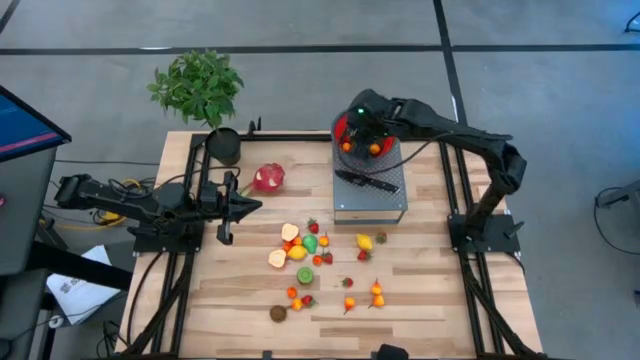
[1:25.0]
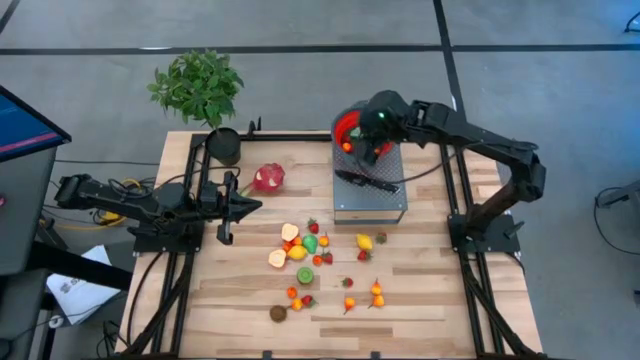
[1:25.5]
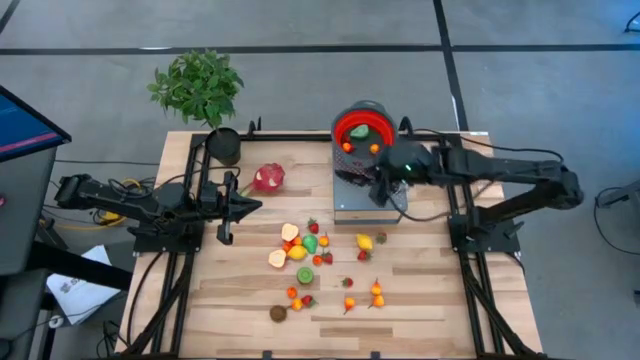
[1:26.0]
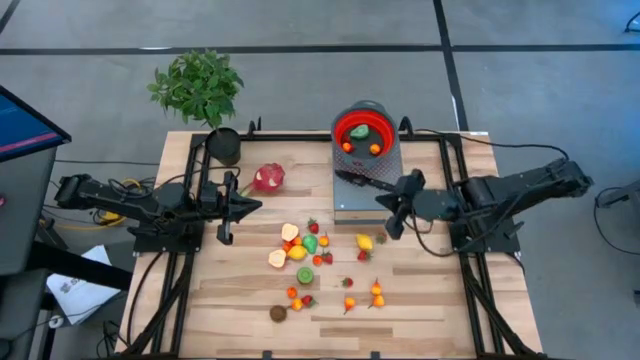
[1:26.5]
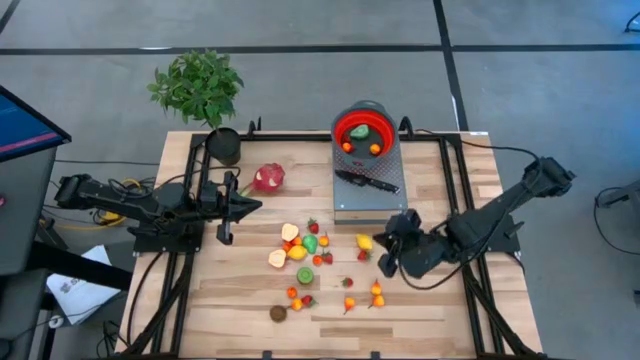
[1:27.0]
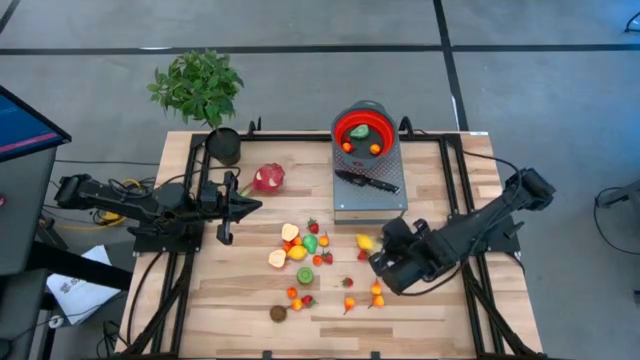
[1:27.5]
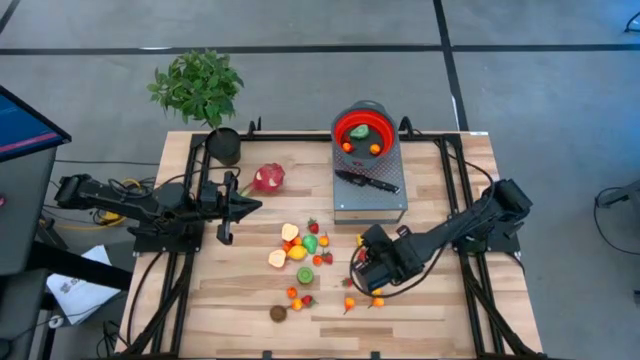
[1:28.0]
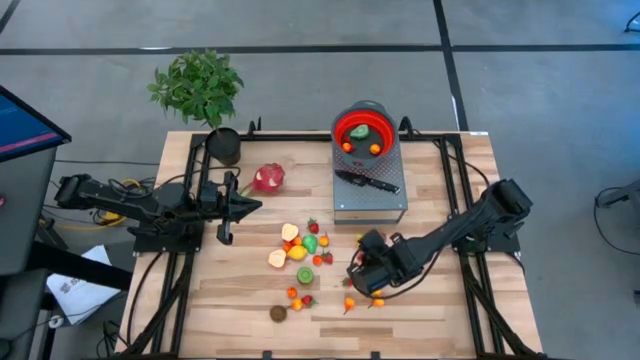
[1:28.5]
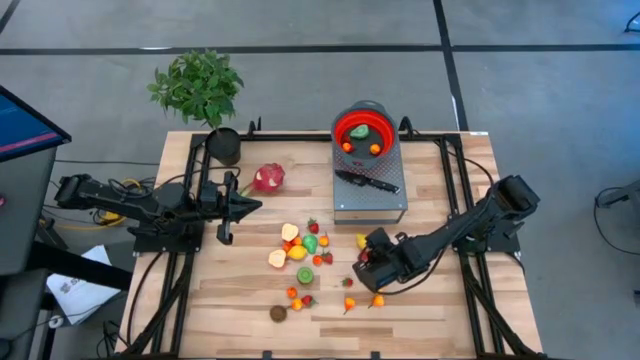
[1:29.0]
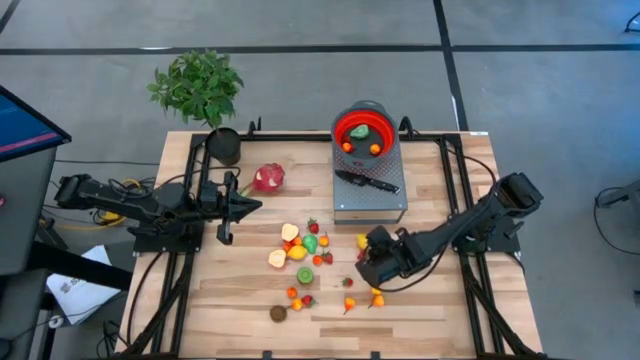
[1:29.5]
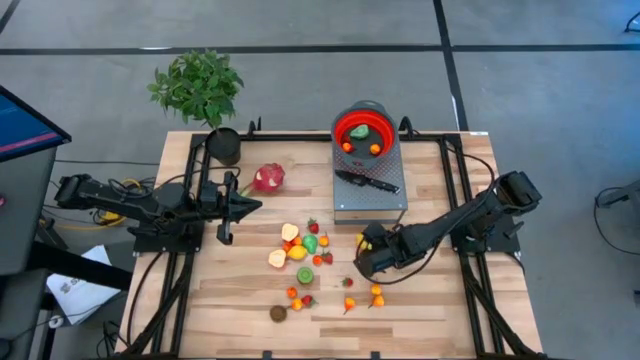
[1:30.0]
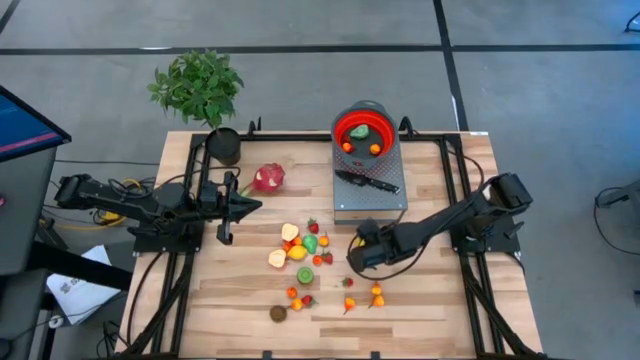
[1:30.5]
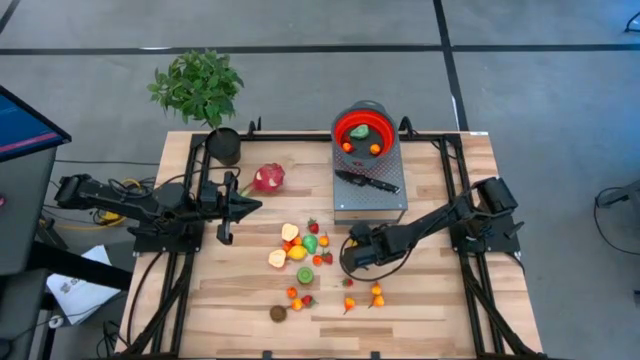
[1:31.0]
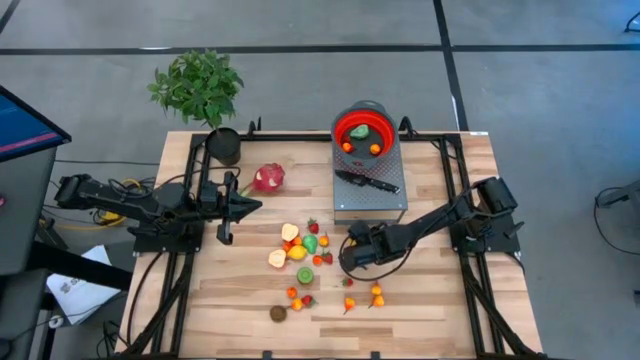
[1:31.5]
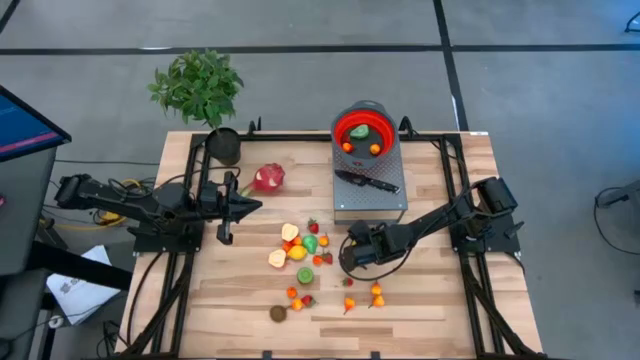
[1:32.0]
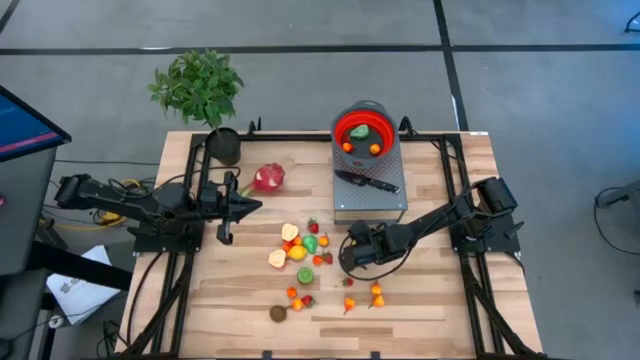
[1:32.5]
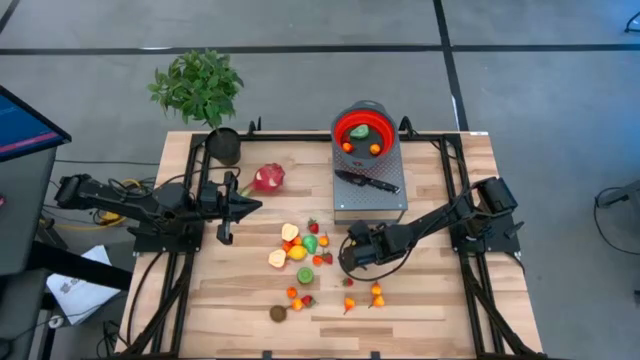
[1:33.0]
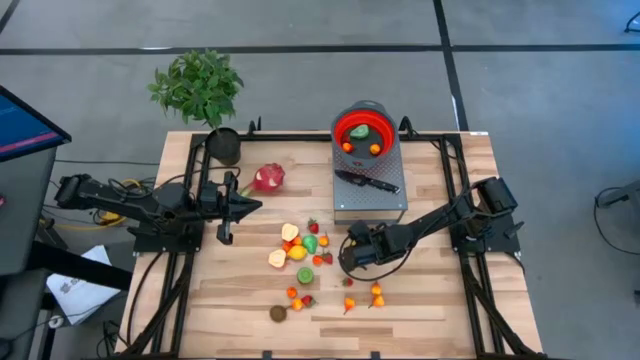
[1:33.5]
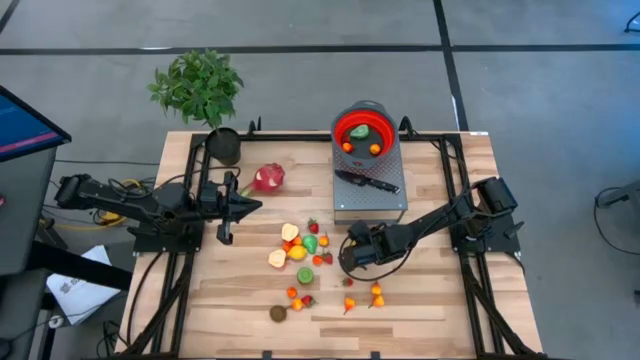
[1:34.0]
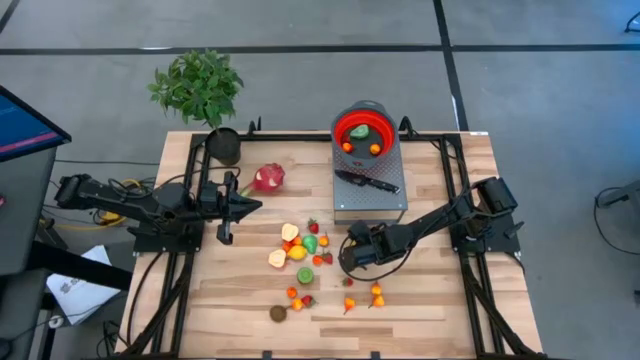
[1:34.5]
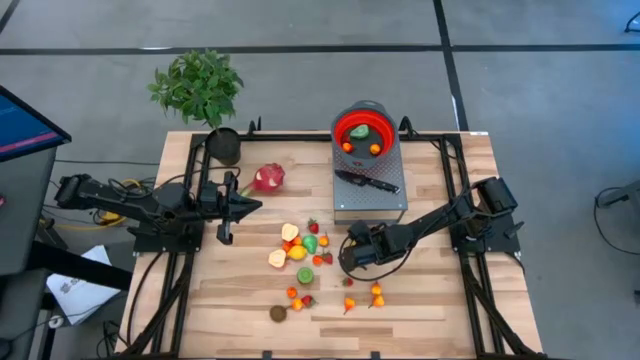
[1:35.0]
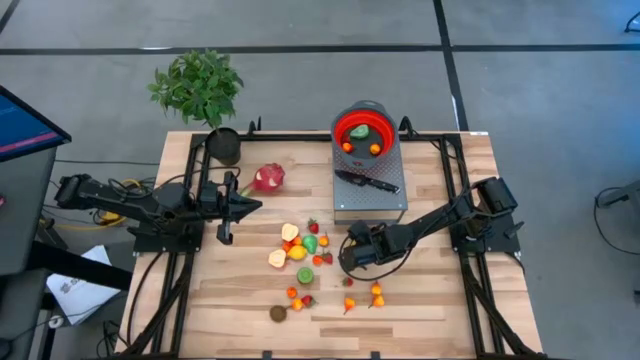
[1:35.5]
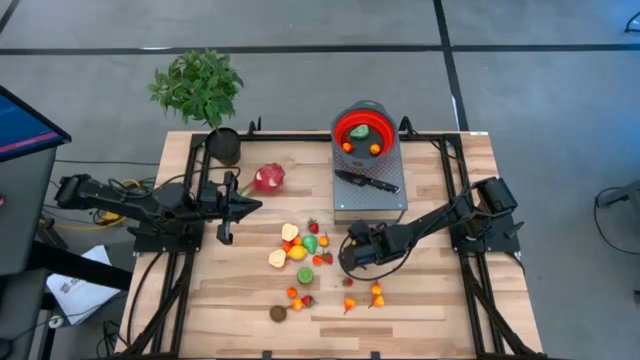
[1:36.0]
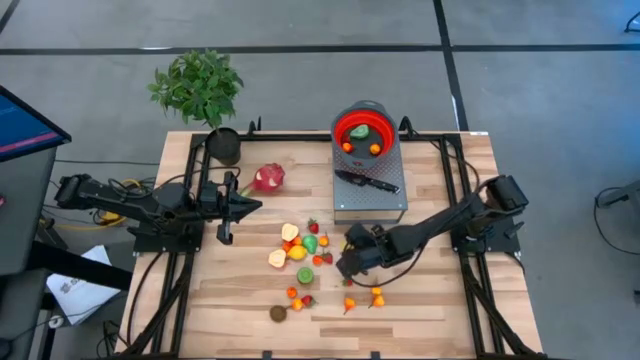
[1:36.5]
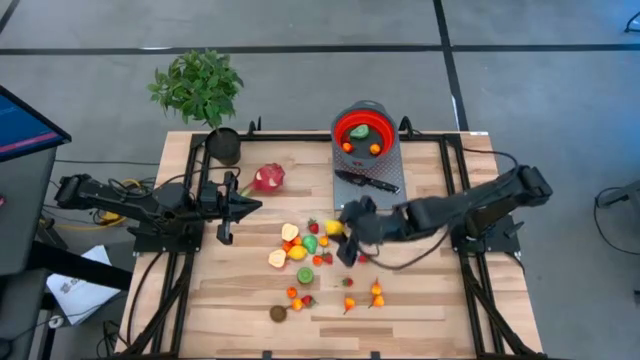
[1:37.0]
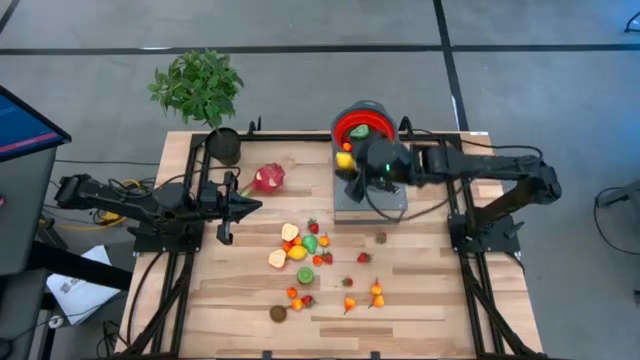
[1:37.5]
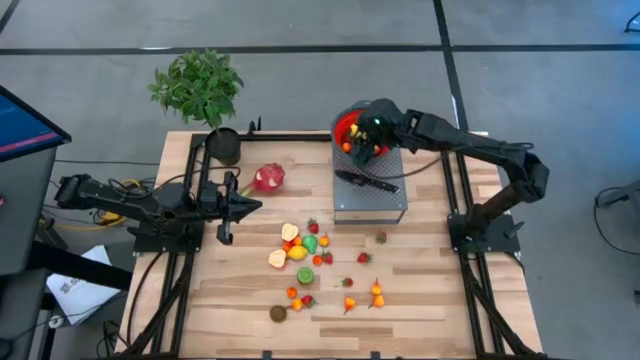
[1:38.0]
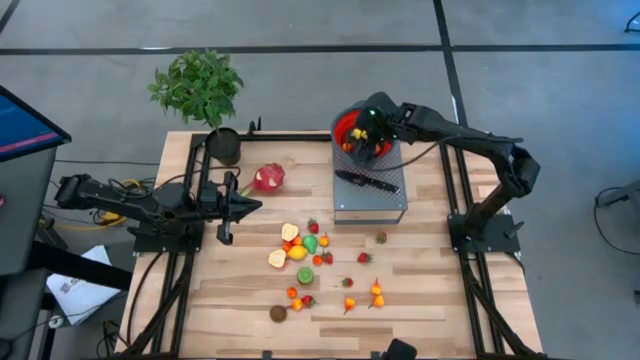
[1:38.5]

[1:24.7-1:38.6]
Task: Pick & Place Fruit
Put the lemon into the red colander on the shelf

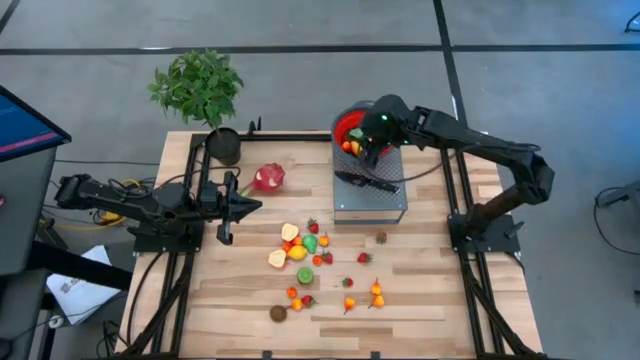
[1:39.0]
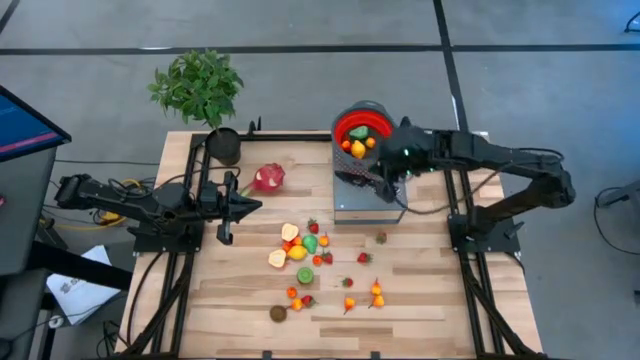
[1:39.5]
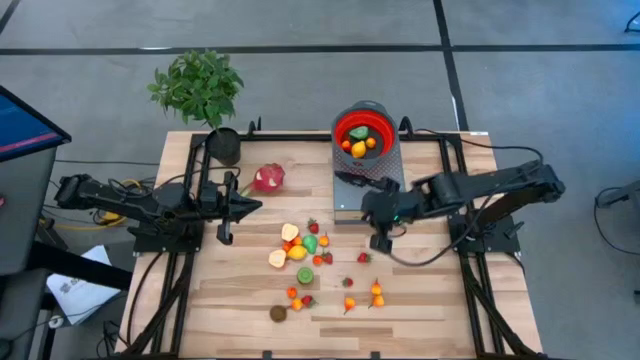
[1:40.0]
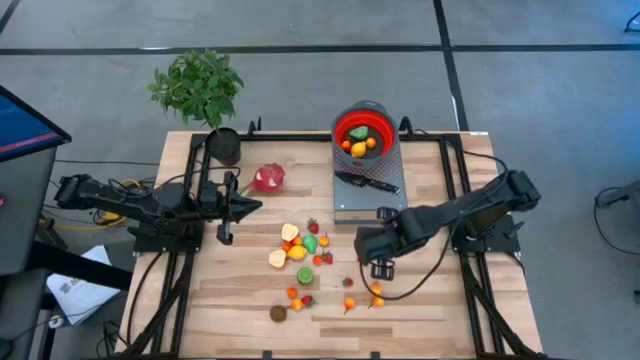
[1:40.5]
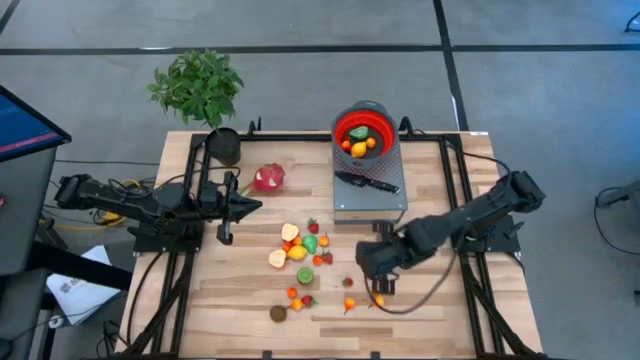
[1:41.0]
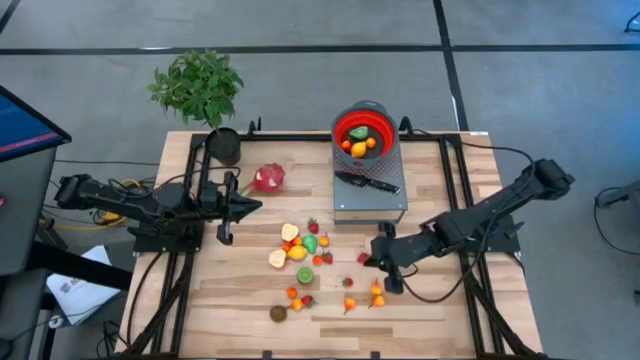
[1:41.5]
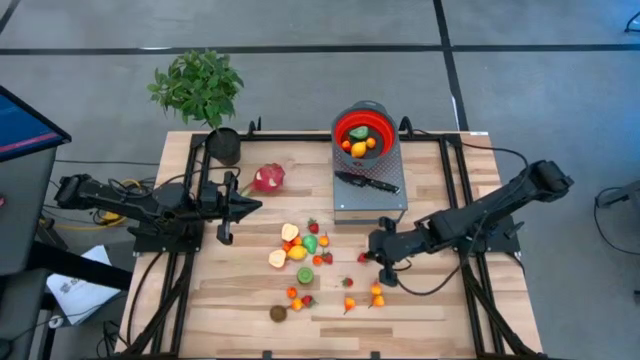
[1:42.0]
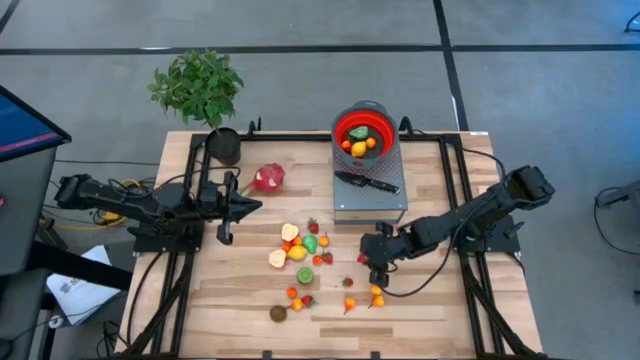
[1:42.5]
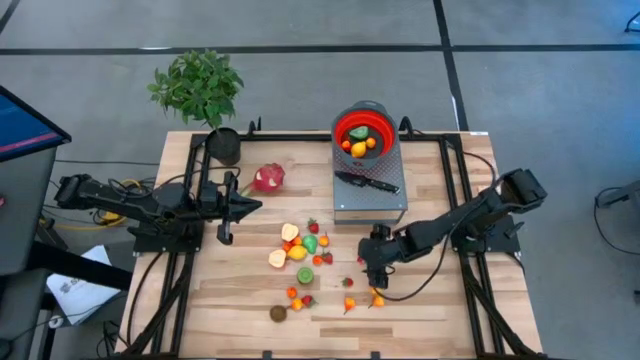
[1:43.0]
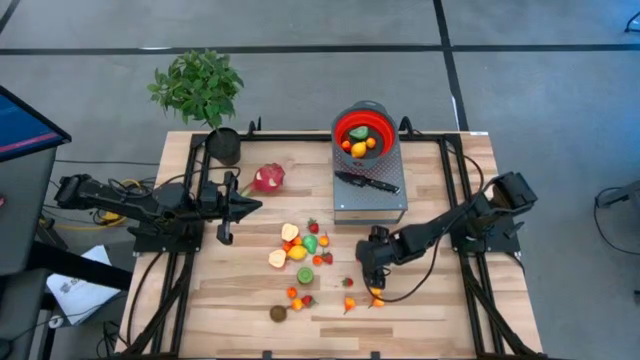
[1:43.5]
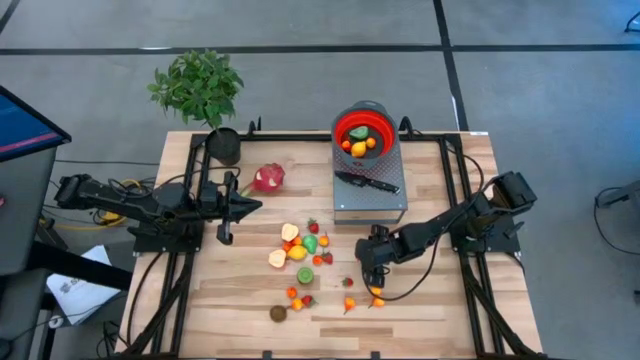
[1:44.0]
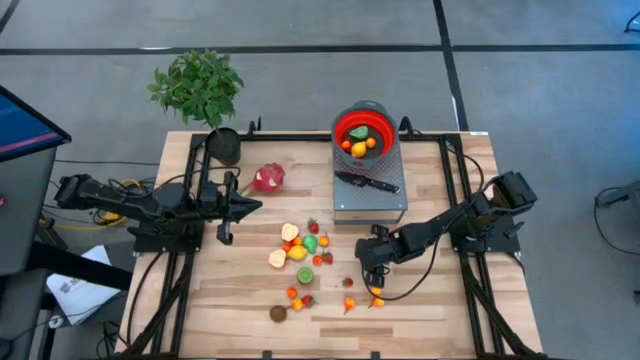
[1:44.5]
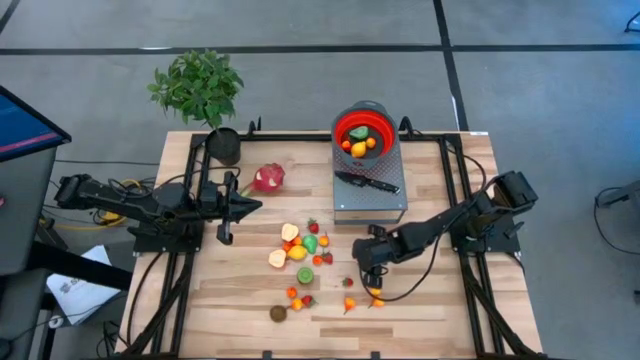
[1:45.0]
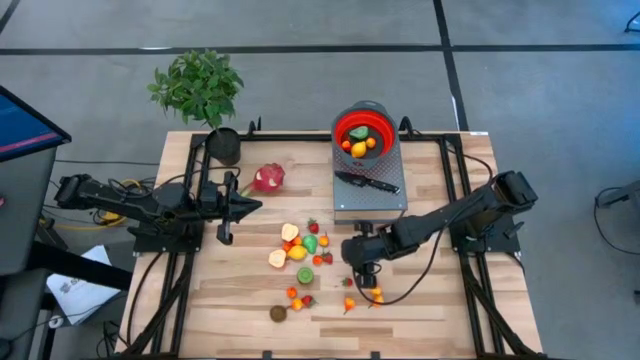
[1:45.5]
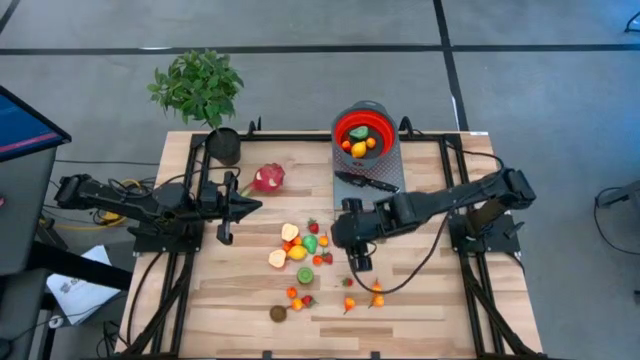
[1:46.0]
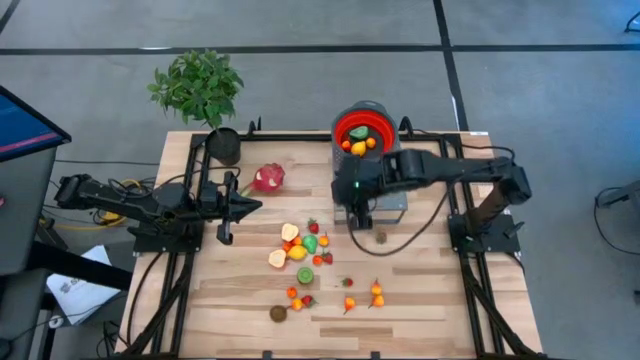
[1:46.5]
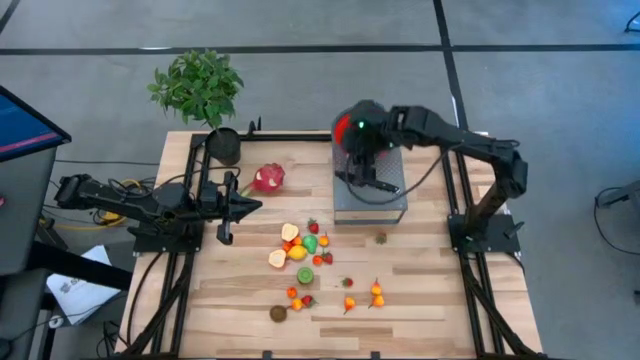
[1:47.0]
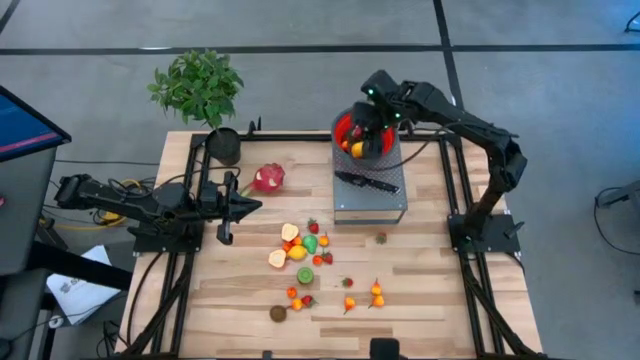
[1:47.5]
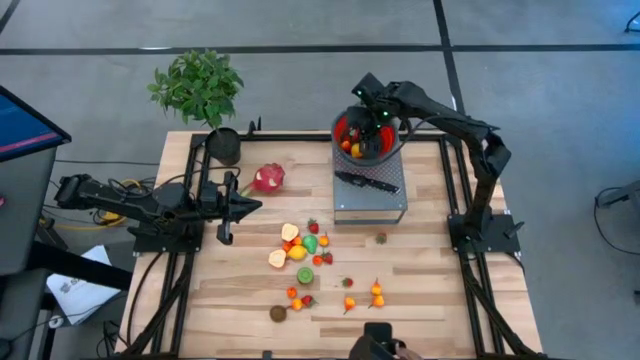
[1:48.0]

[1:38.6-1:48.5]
Put the strawberry into the red colander on the shelf
